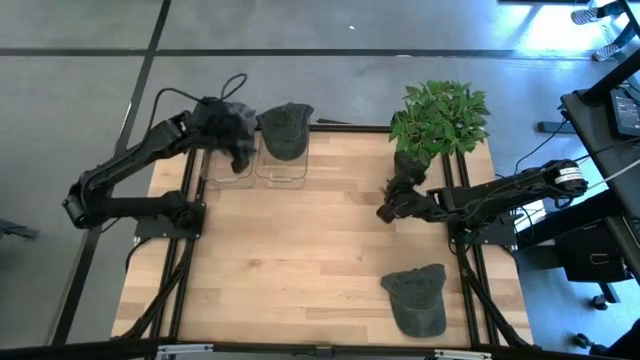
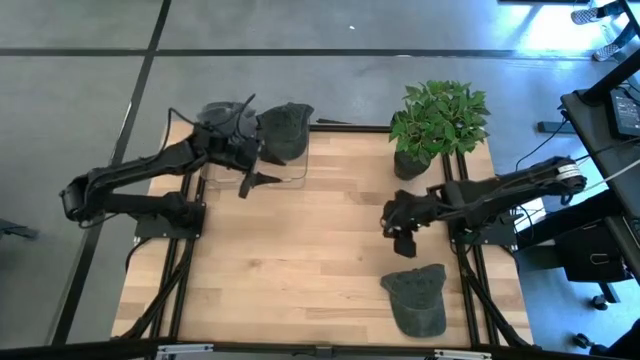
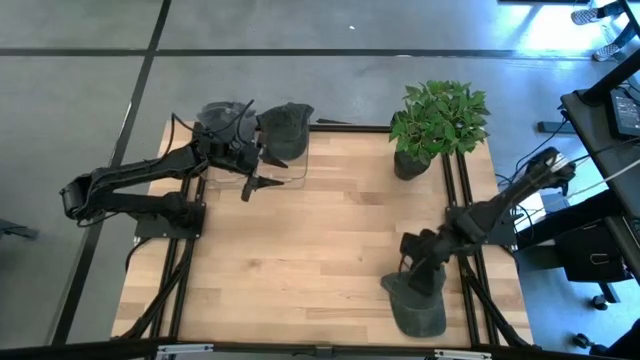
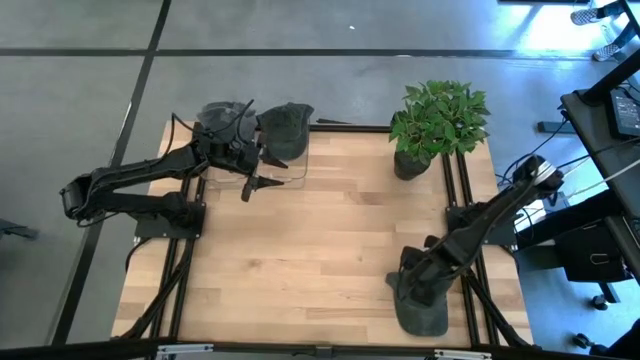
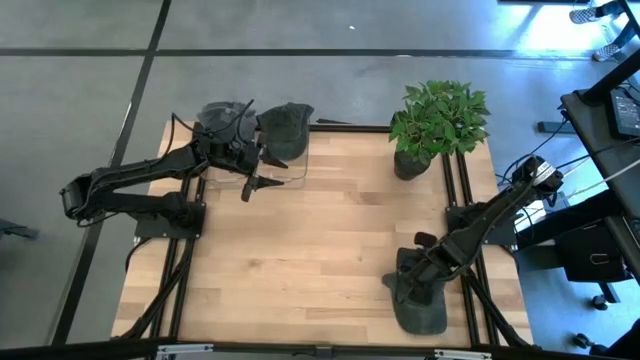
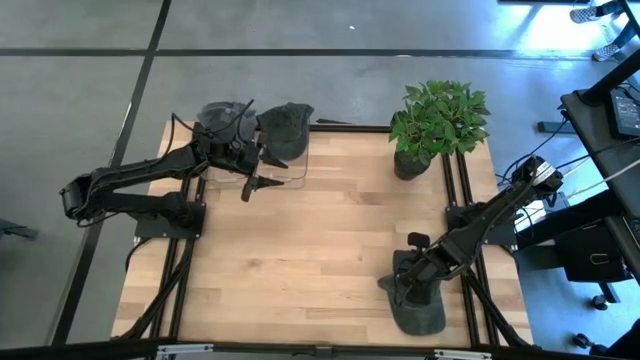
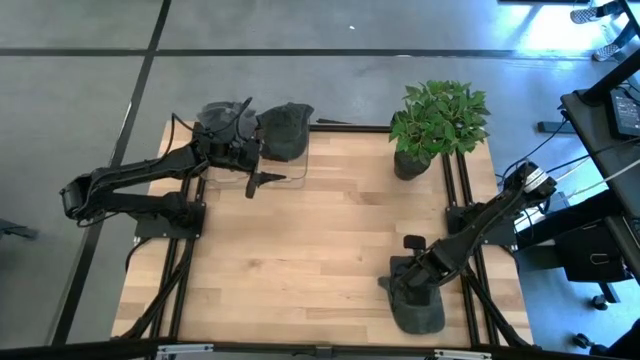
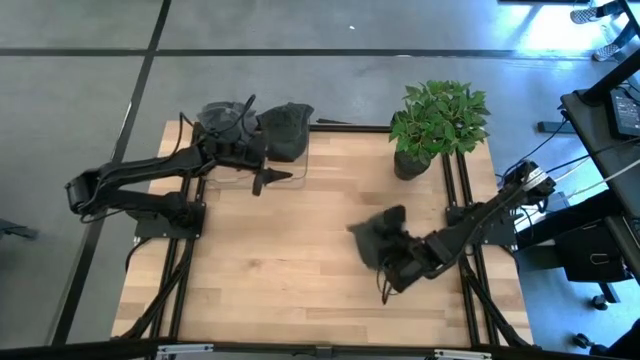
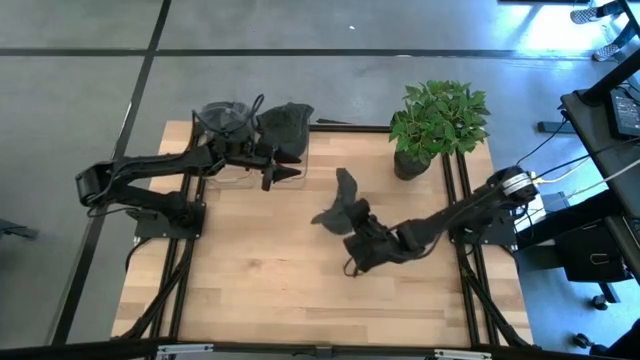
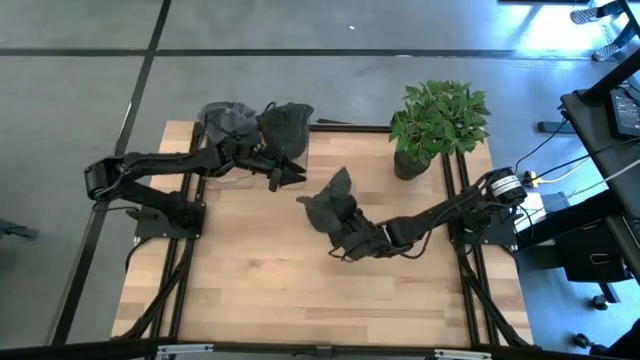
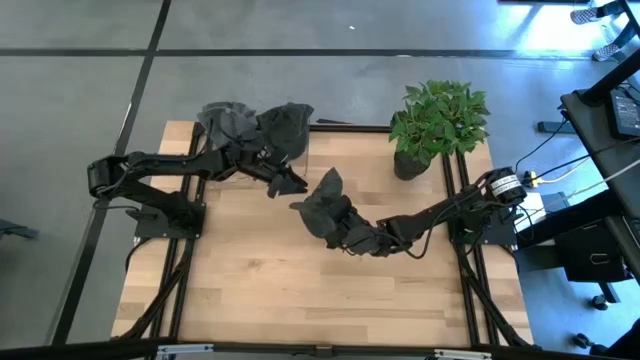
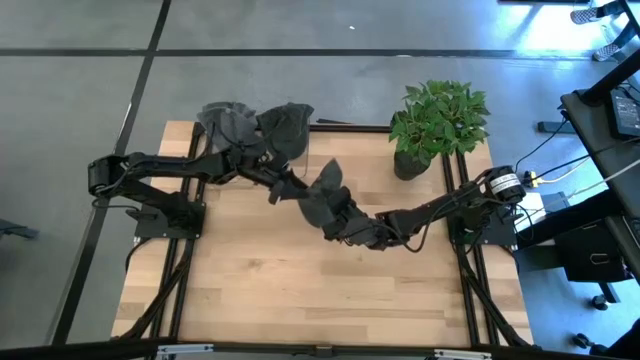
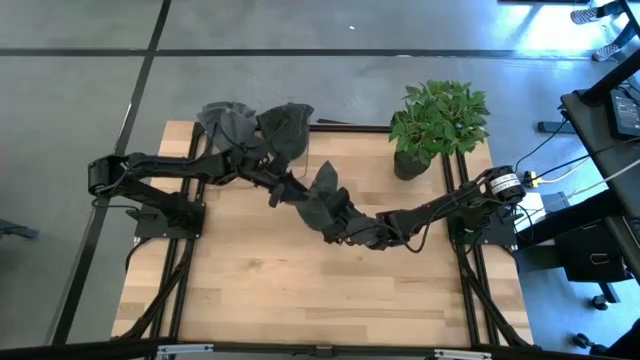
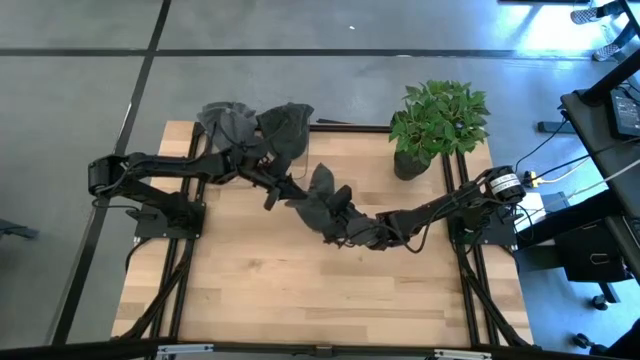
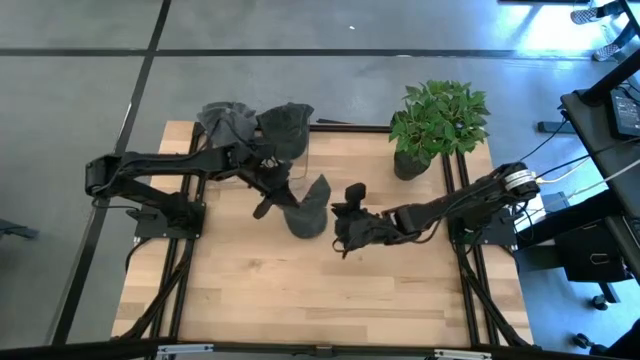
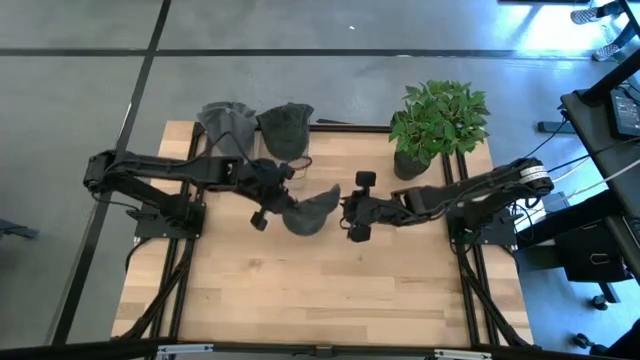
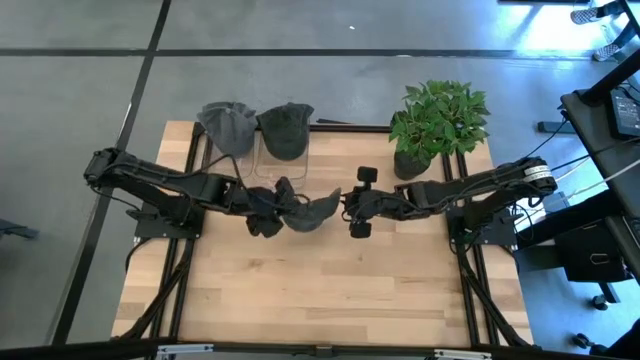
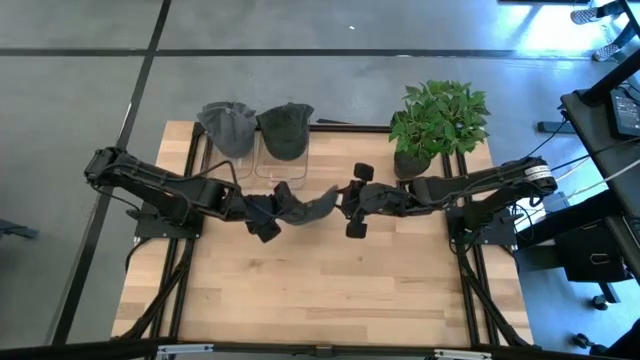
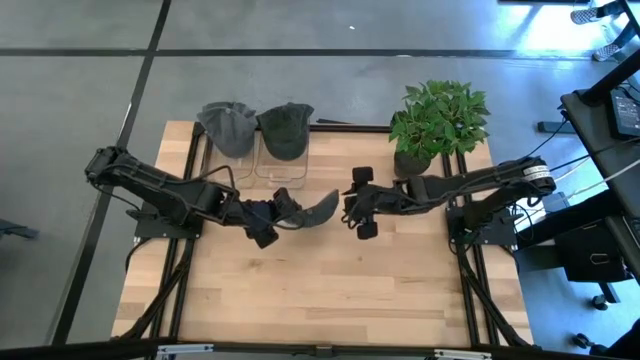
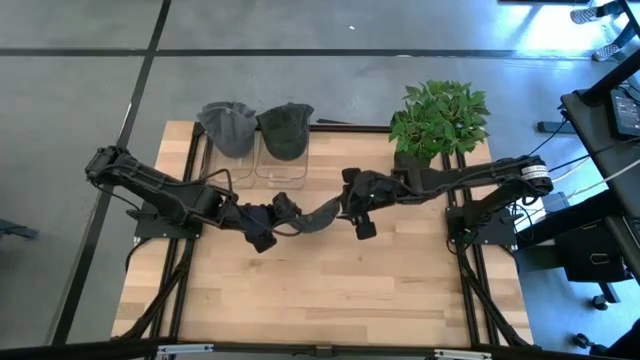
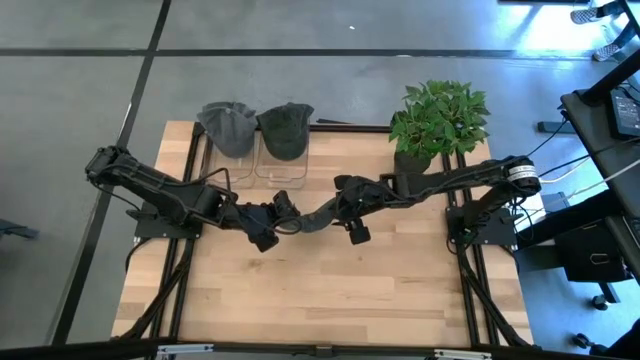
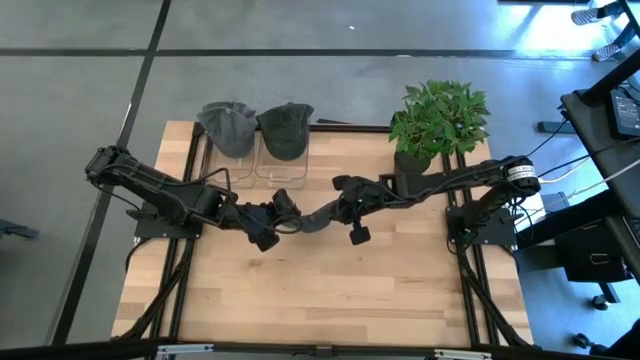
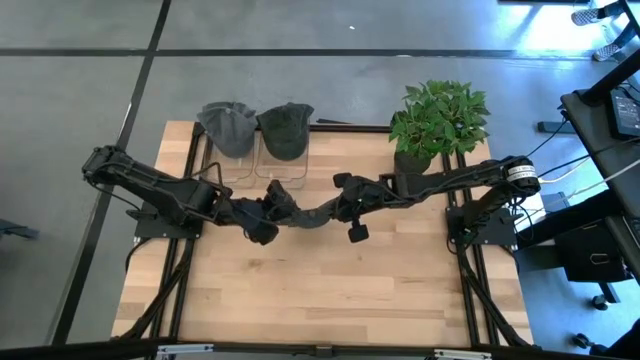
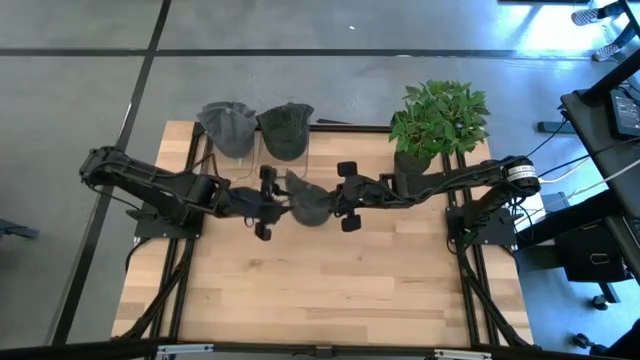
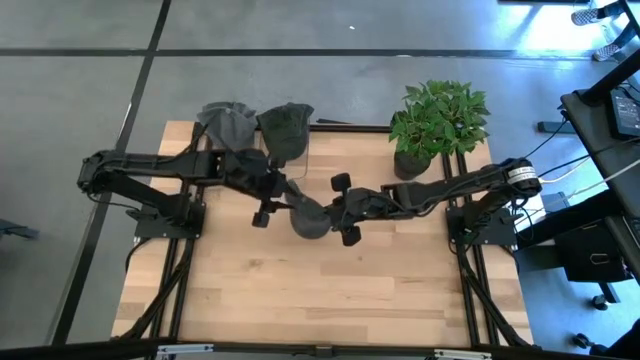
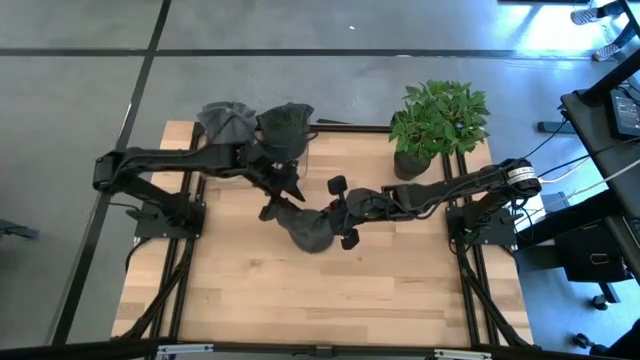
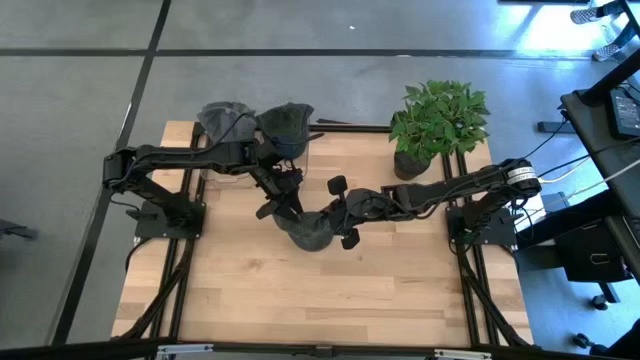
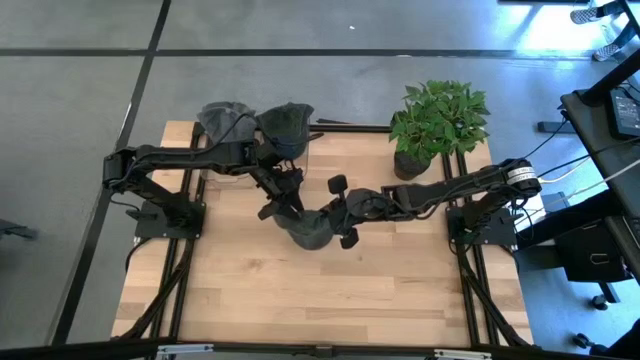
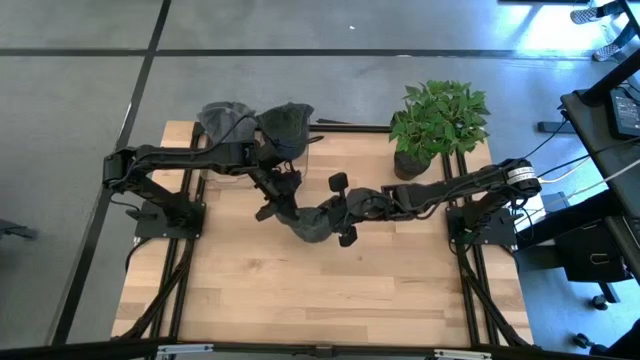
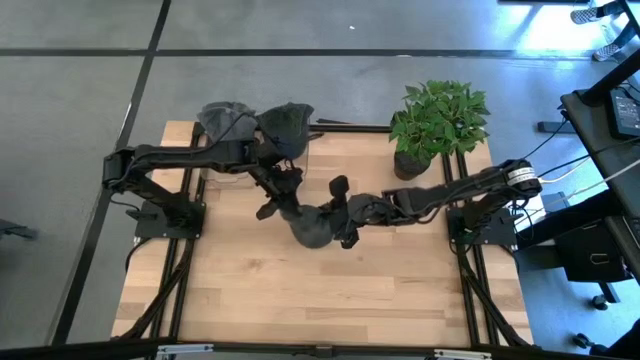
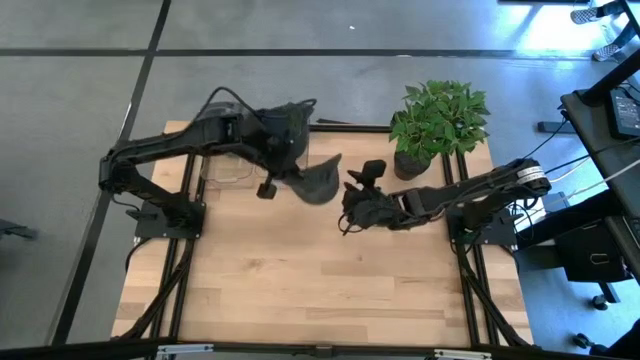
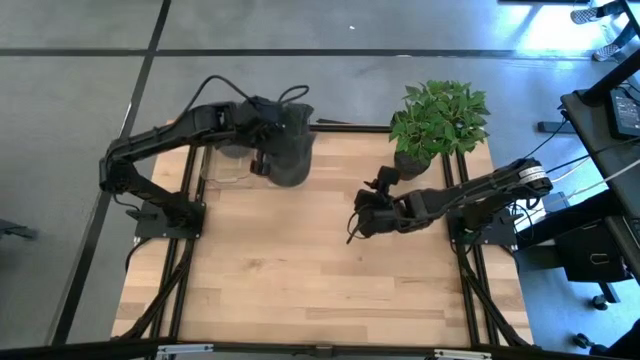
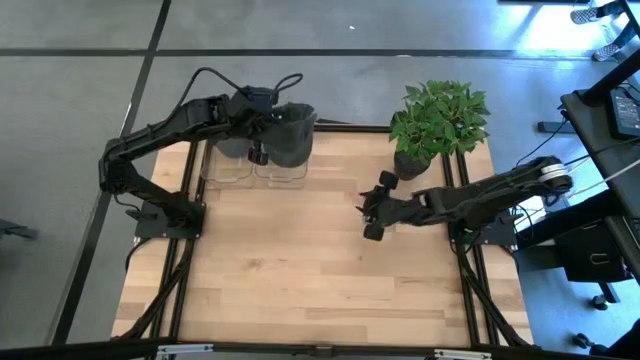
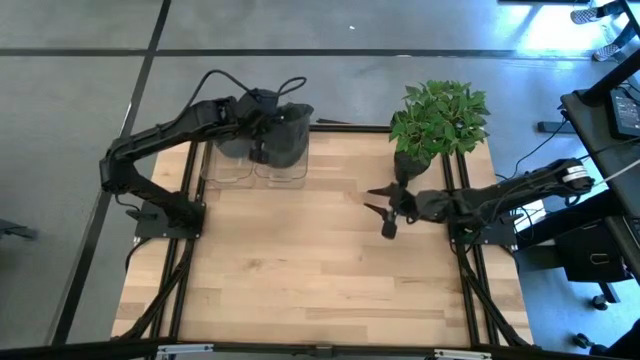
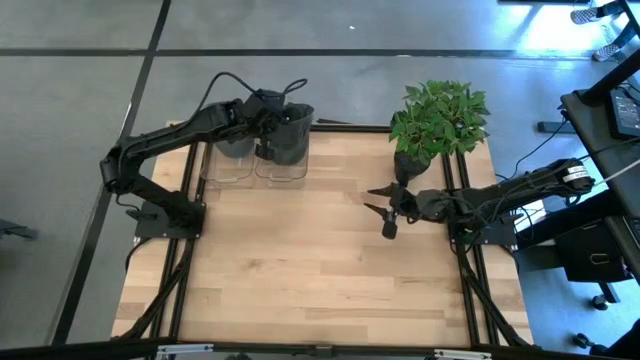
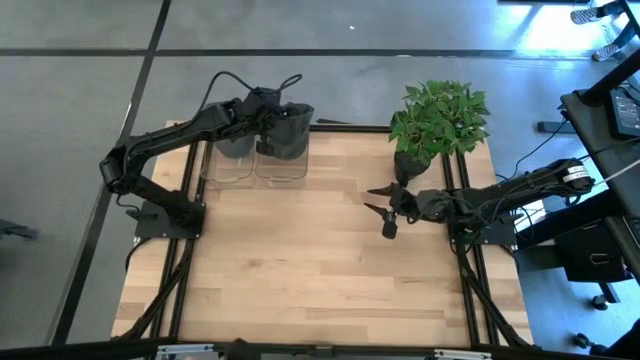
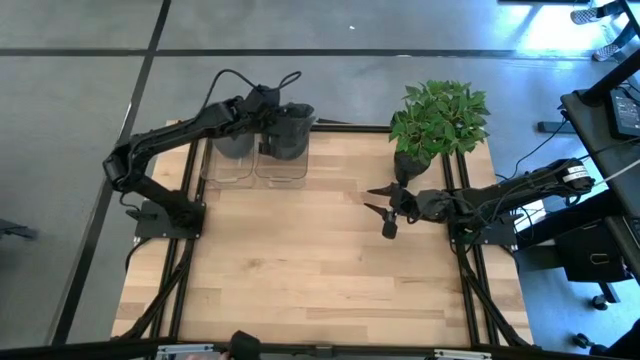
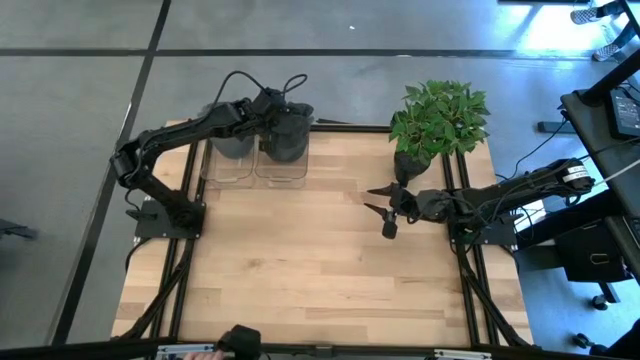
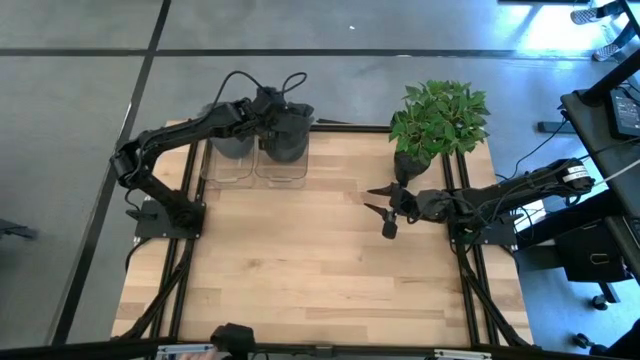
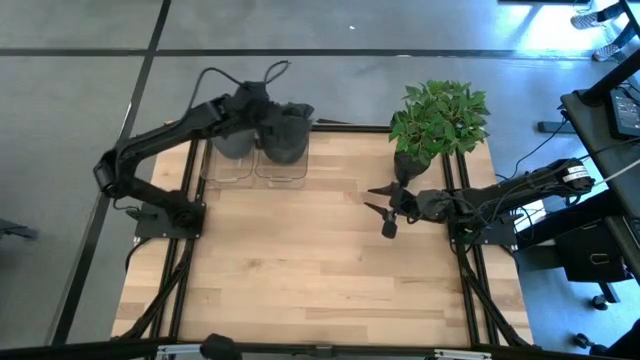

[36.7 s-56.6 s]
Task: Pick & Place hat
Put the black cap into the right transparent bin

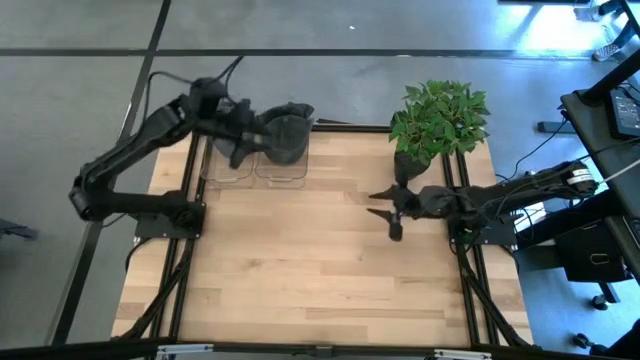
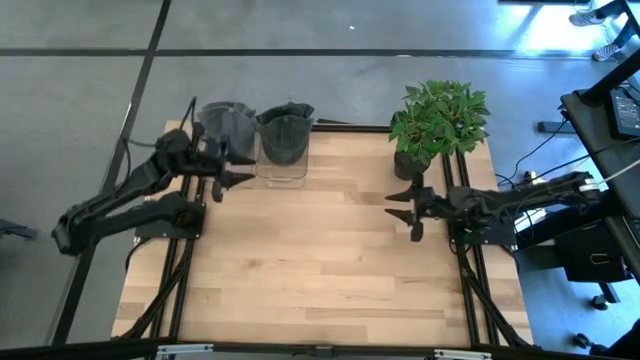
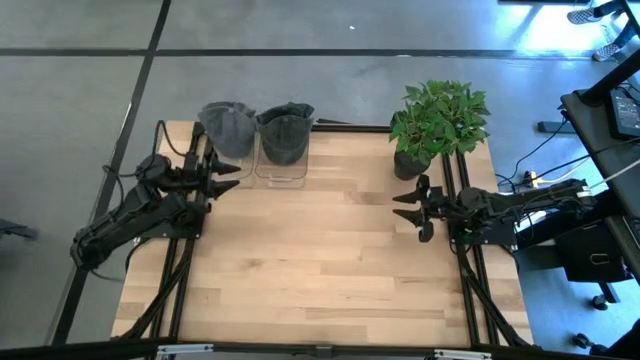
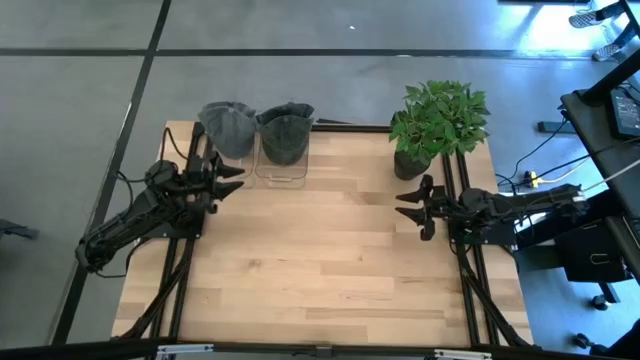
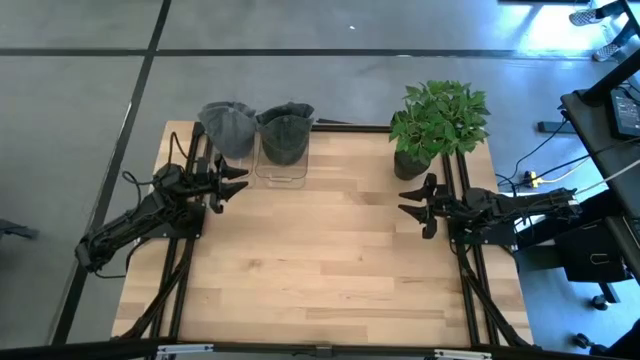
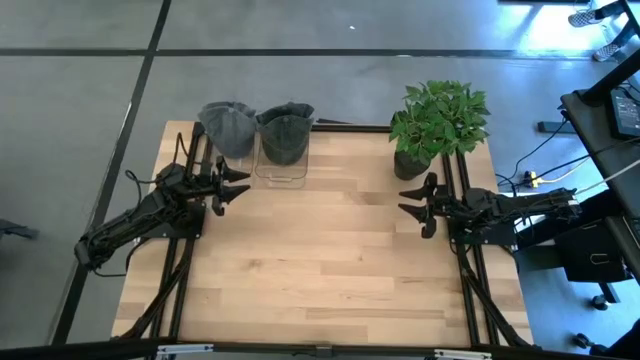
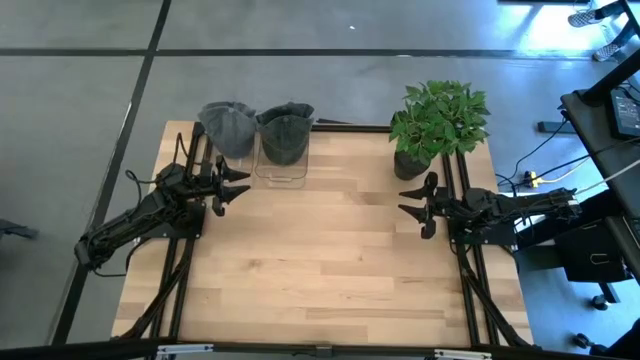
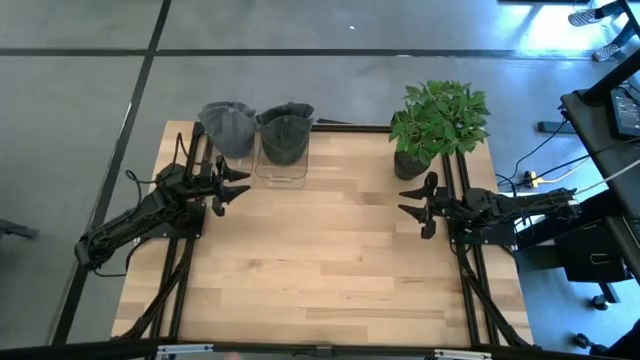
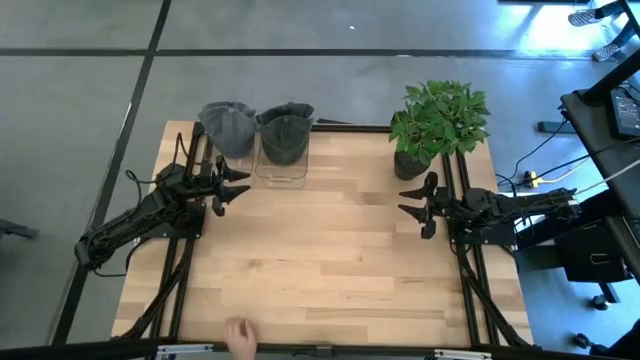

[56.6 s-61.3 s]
Return to Home Position
